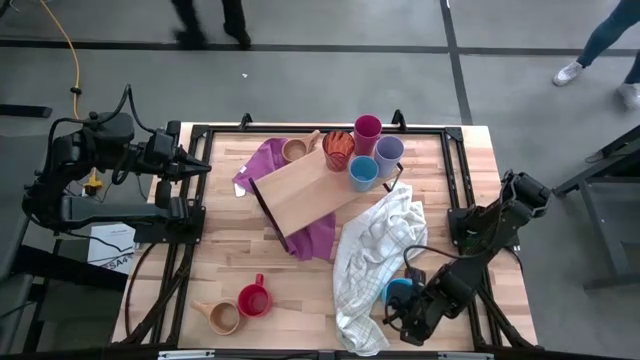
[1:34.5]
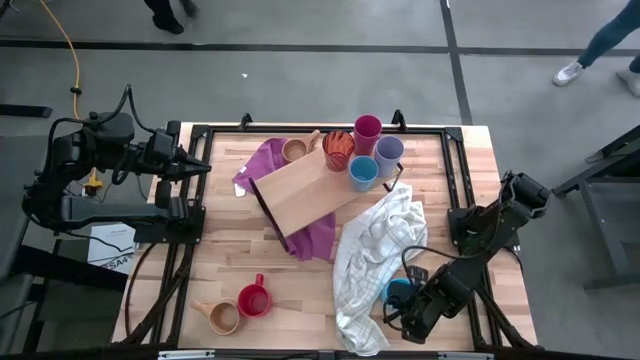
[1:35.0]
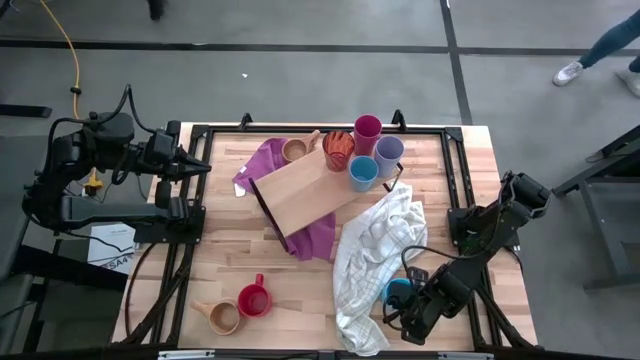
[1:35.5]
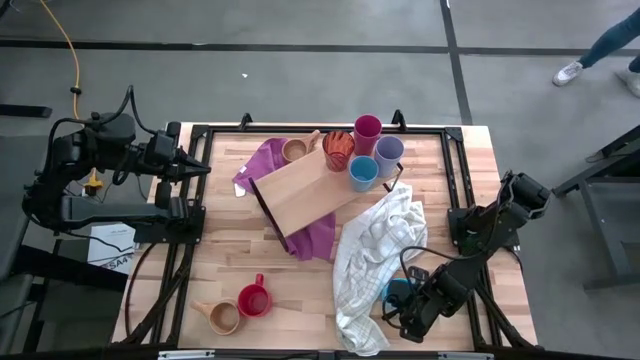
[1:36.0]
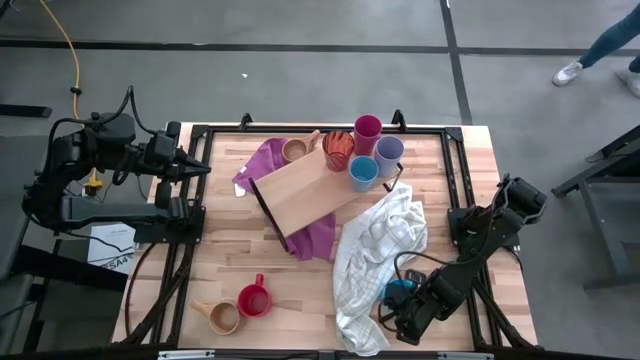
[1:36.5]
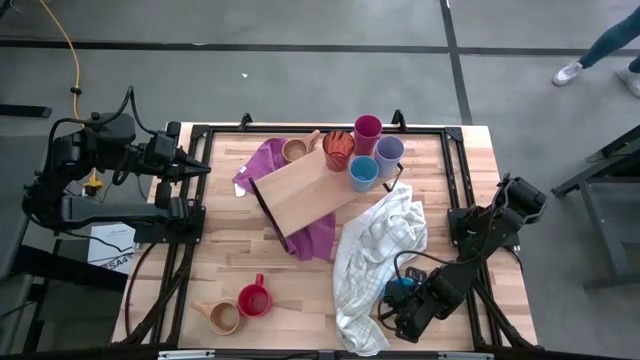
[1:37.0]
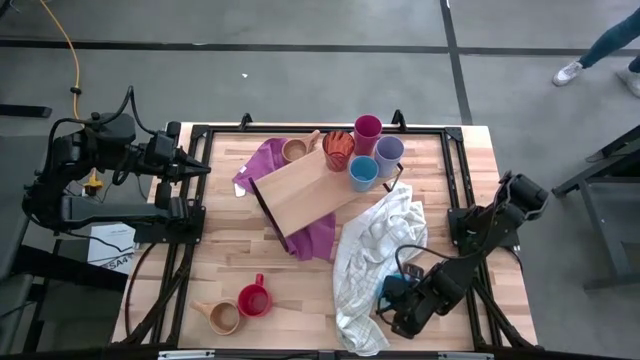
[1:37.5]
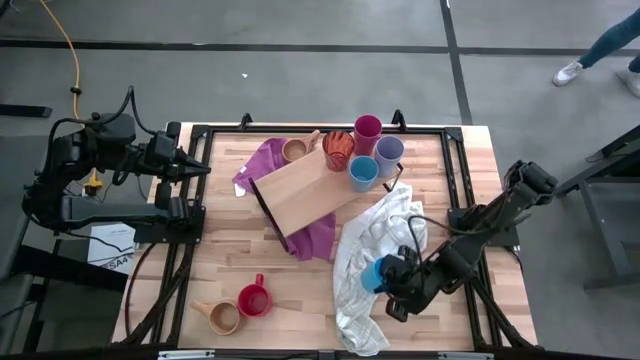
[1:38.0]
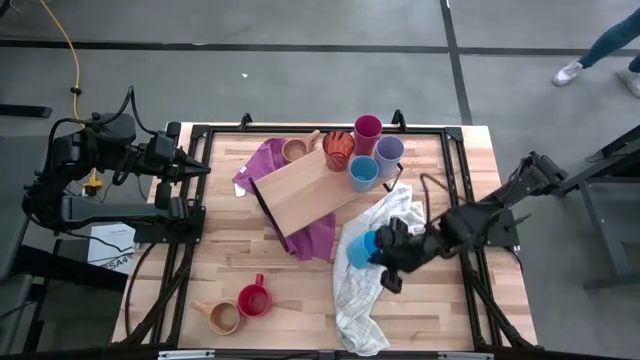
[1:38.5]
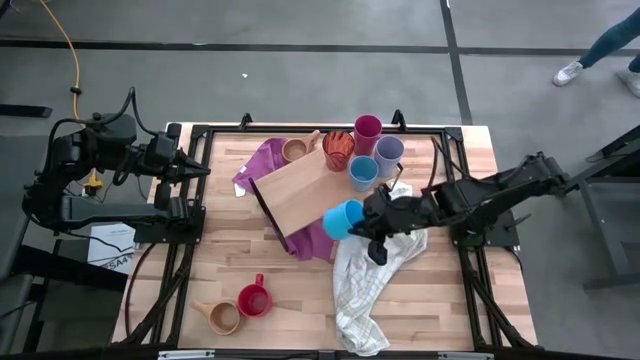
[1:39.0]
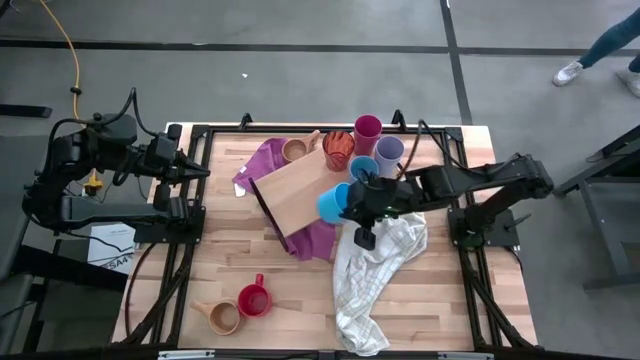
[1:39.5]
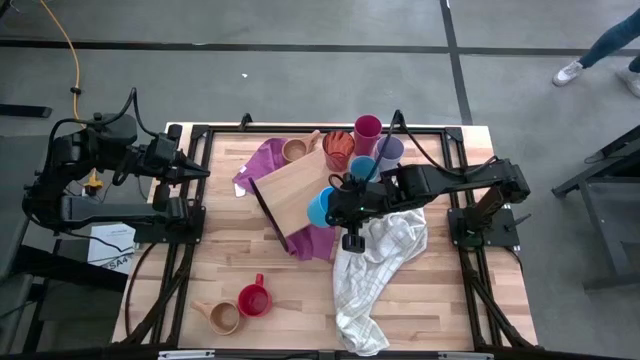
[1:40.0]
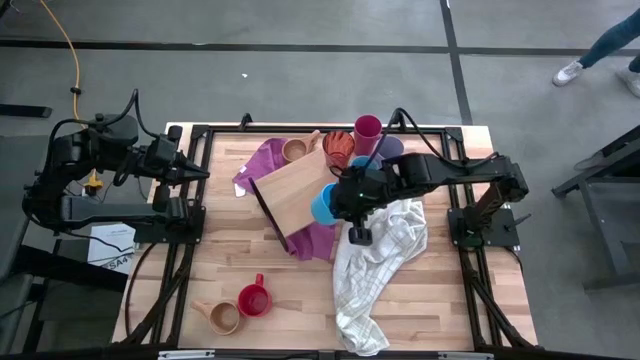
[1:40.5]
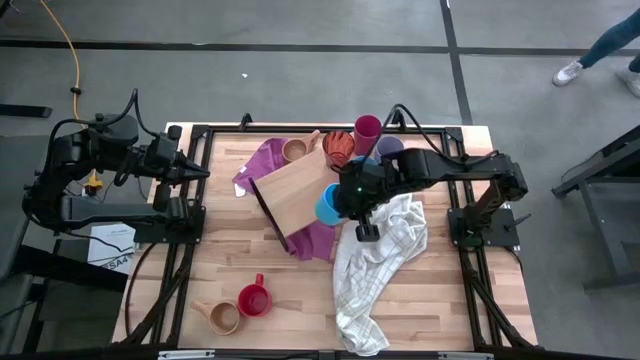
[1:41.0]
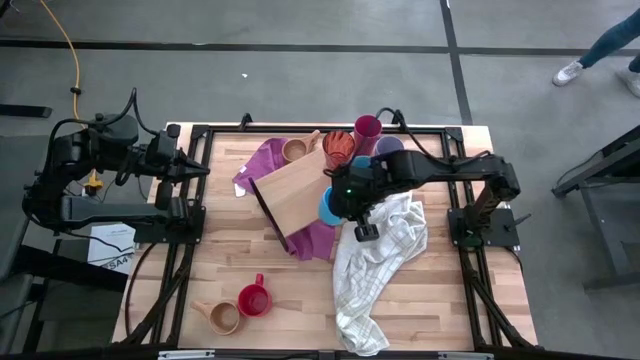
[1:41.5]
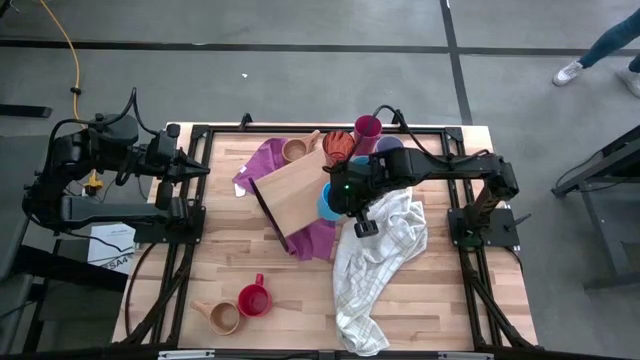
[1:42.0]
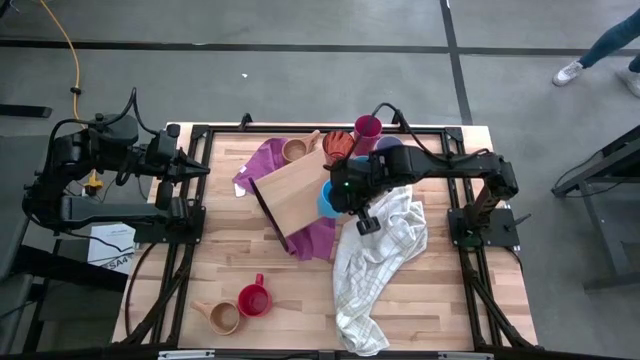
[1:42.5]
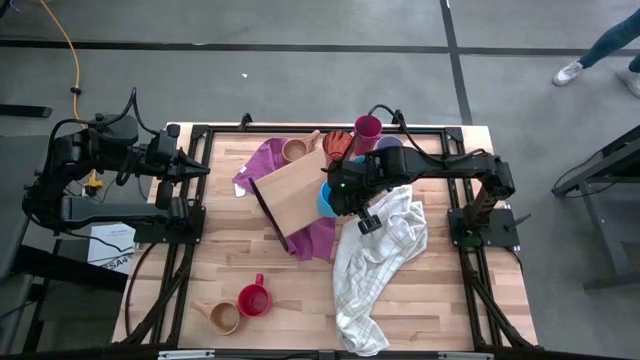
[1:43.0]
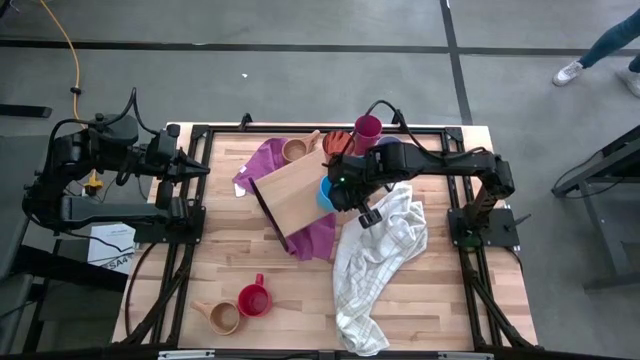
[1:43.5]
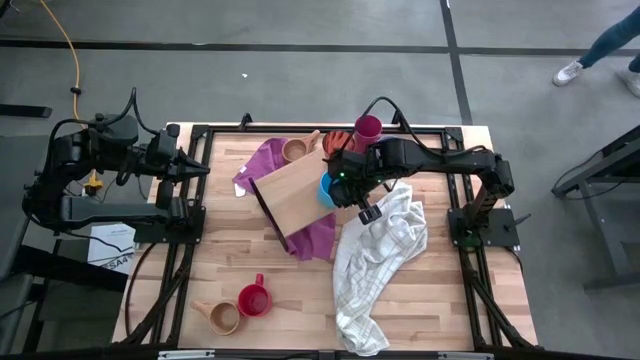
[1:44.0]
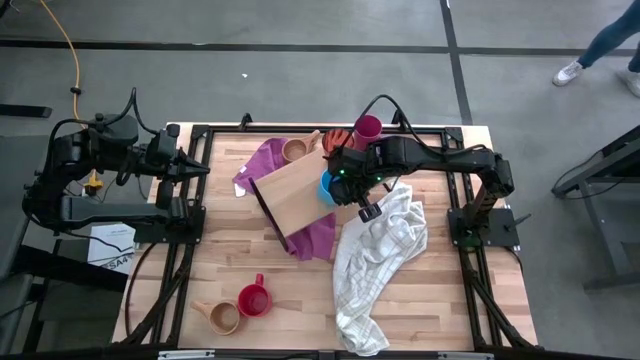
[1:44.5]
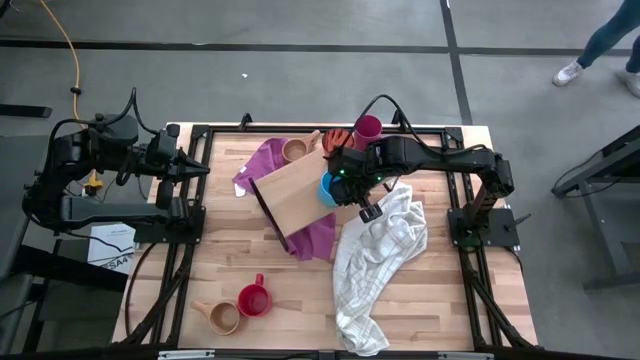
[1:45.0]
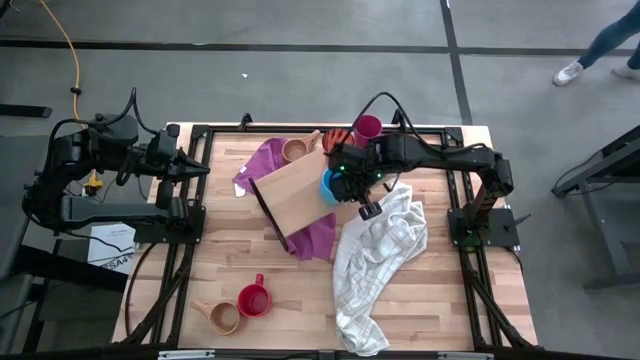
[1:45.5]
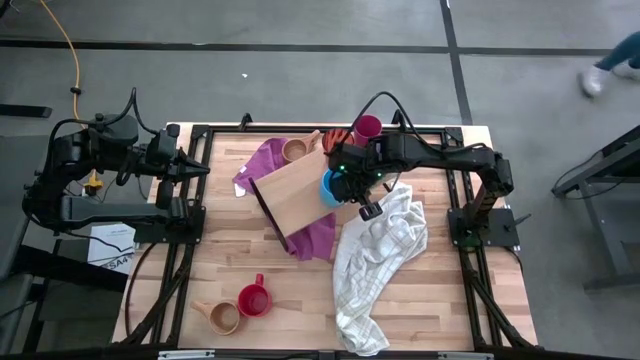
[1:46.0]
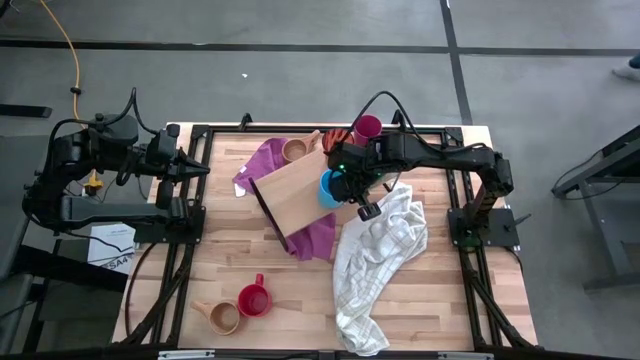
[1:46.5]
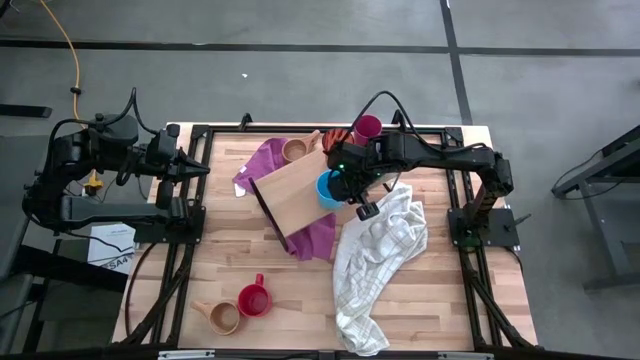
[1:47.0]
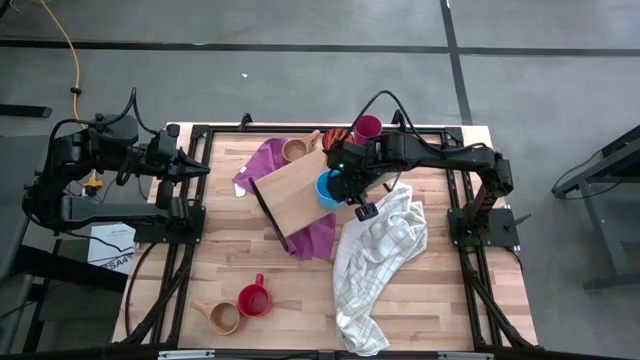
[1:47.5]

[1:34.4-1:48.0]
Task: Stack small to large cups/mugs on shelf
Put the light blue mug on the shelf

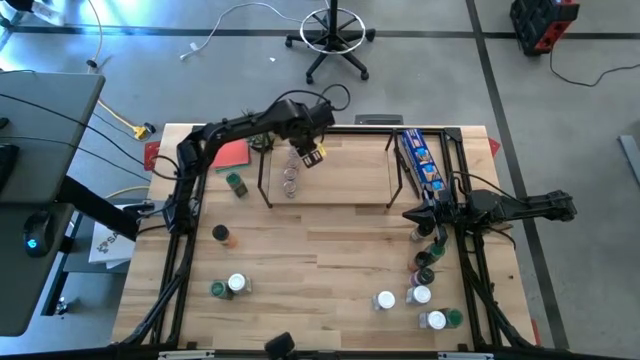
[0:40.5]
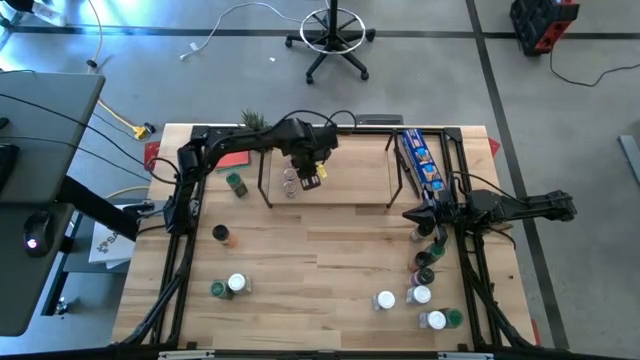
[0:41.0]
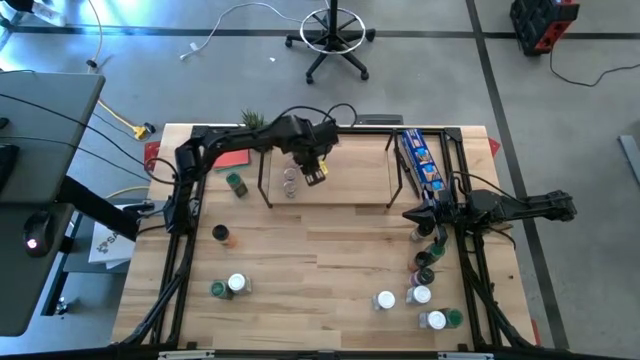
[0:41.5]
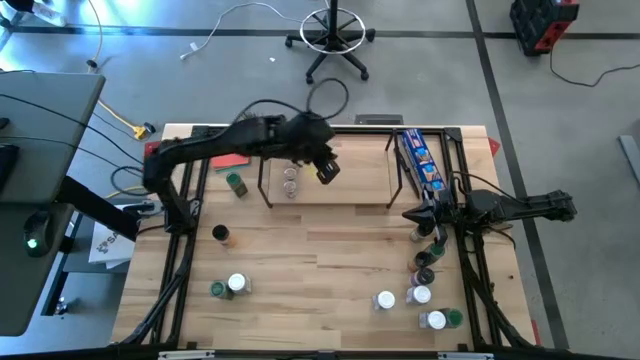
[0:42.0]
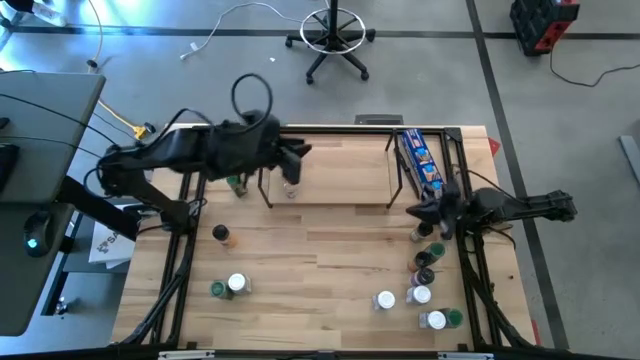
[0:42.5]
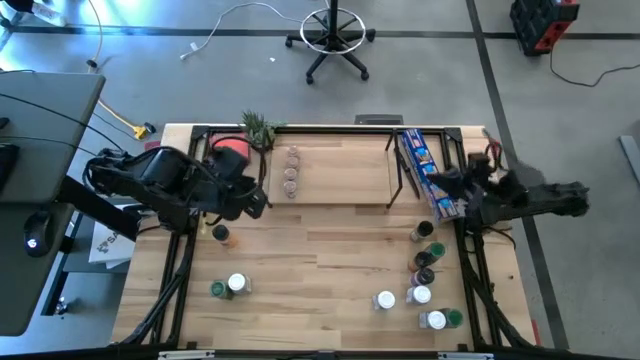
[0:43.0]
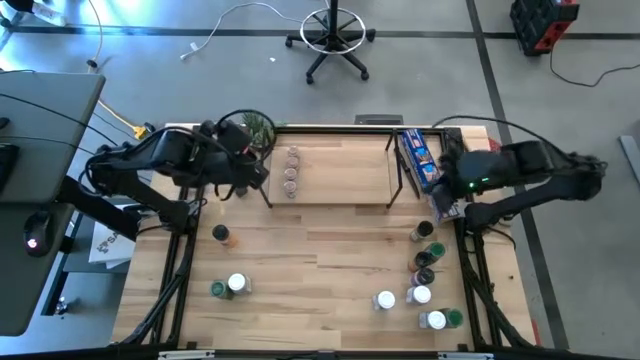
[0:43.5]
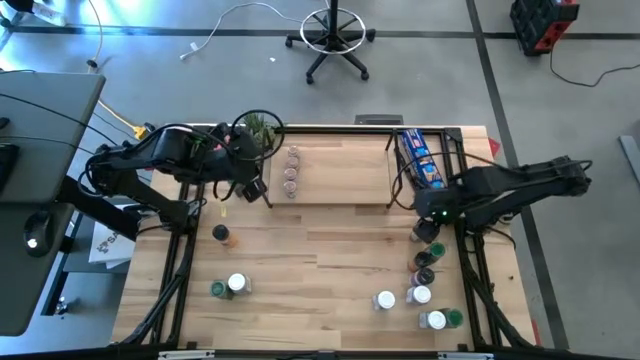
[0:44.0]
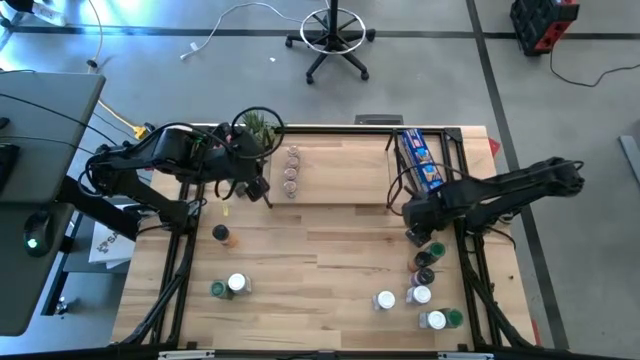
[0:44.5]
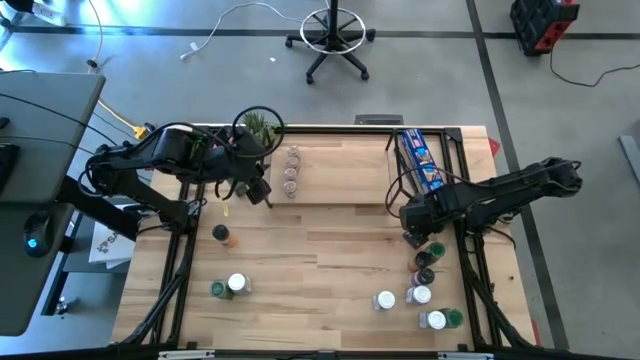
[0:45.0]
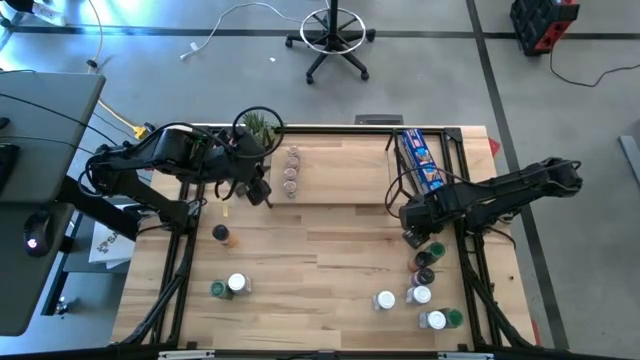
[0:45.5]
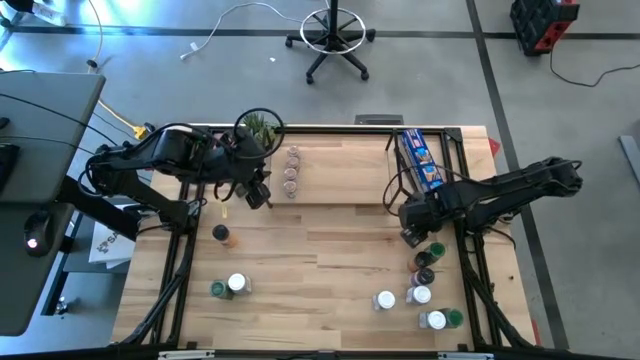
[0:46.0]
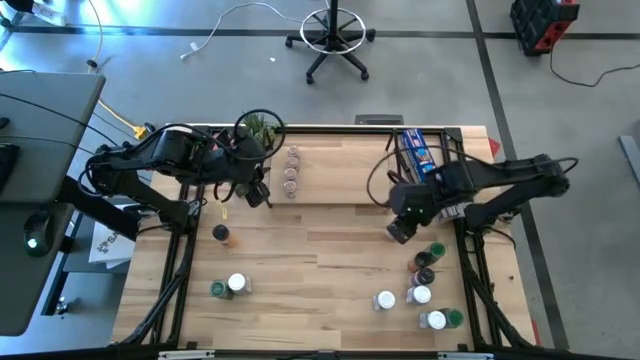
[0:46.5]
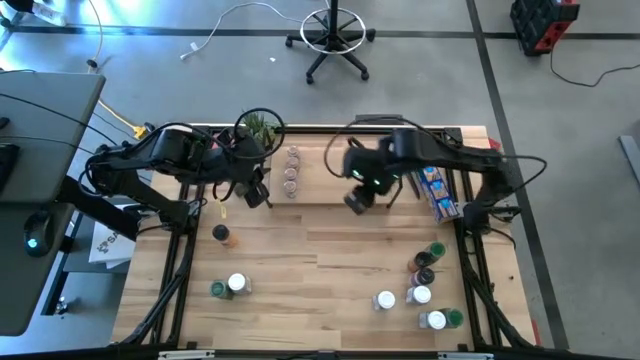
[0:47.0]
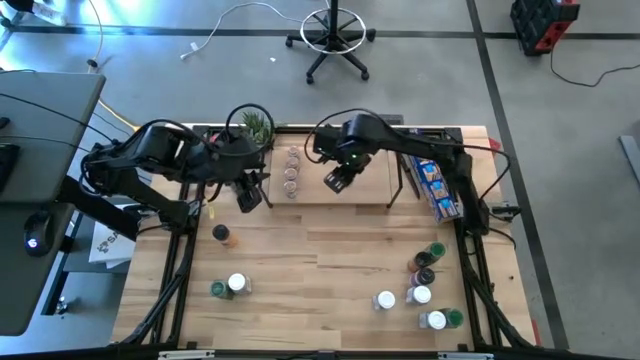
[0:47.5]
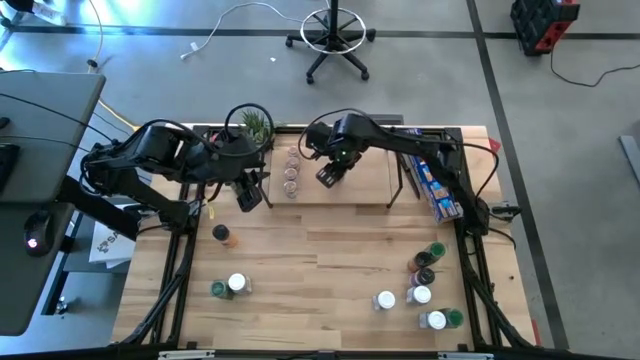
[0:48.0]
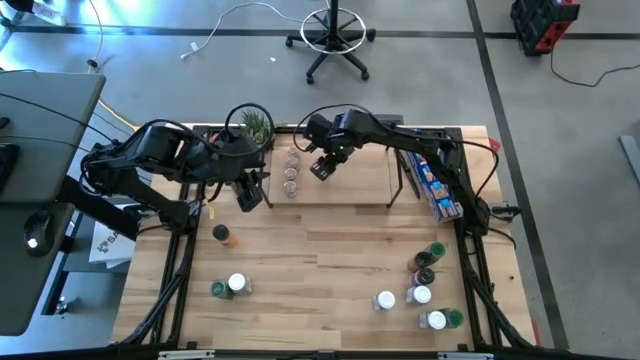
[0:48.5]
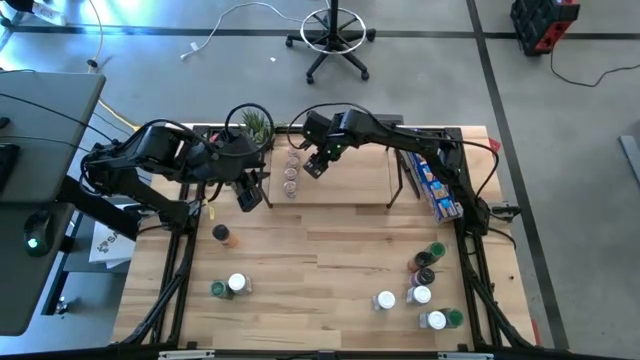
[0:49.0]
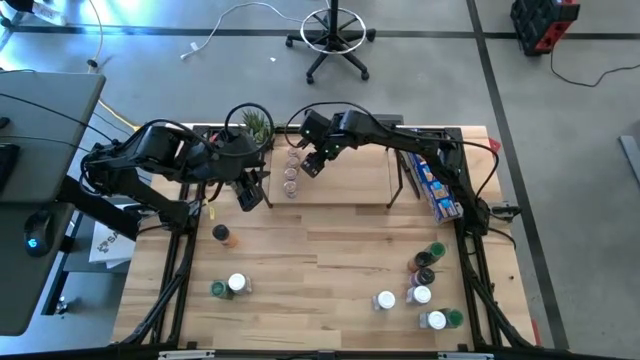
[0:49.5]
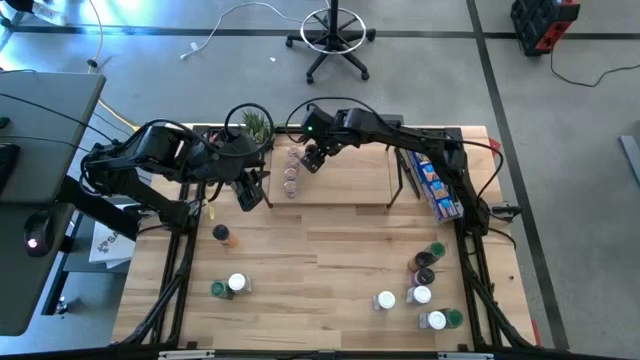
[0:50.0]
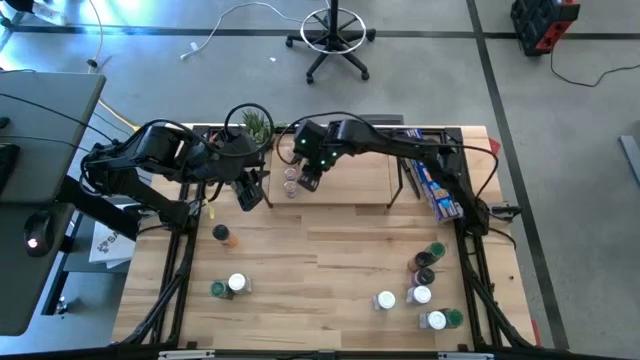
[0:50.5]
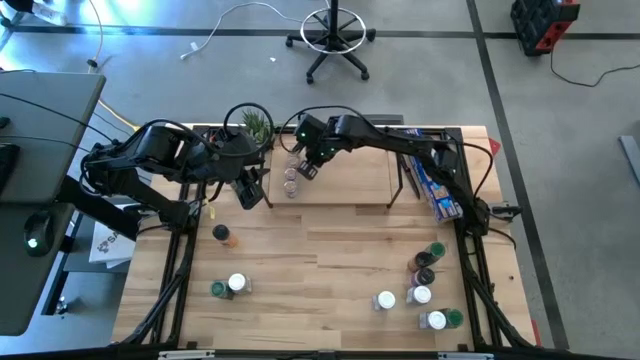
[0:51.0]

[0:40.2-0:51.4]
Task: Shelf spices
Put the black seasoning bottle on the shelf
